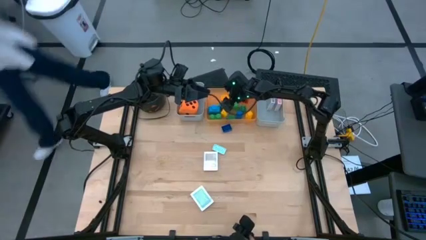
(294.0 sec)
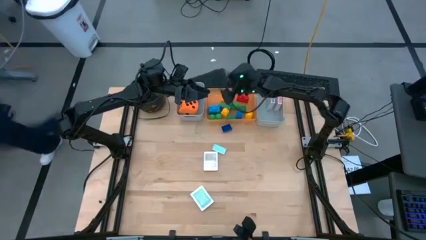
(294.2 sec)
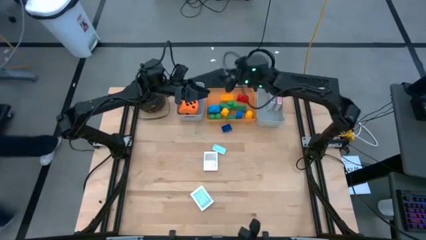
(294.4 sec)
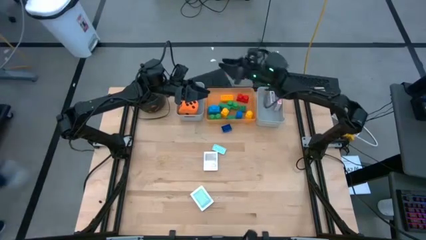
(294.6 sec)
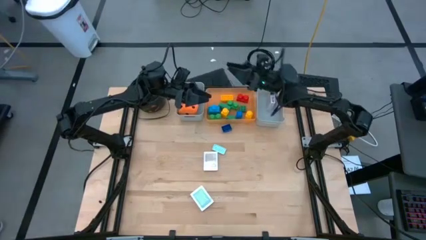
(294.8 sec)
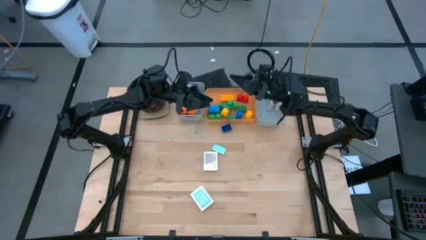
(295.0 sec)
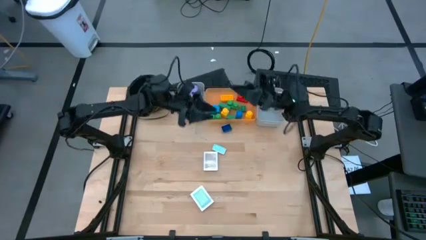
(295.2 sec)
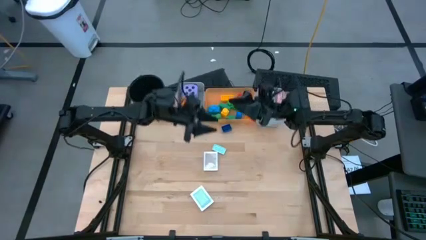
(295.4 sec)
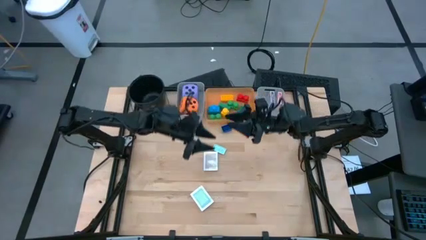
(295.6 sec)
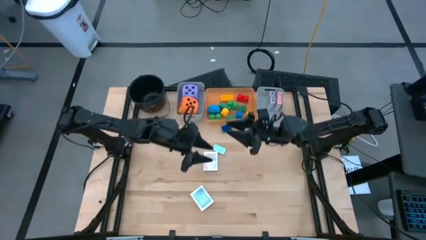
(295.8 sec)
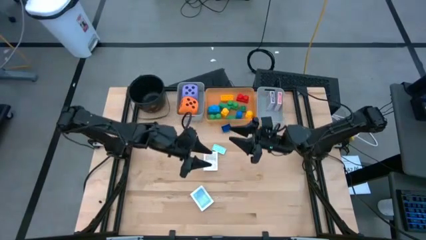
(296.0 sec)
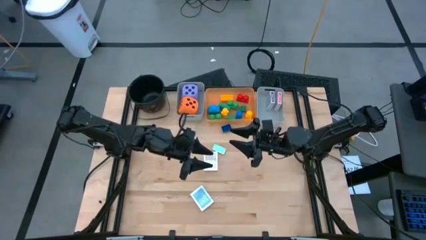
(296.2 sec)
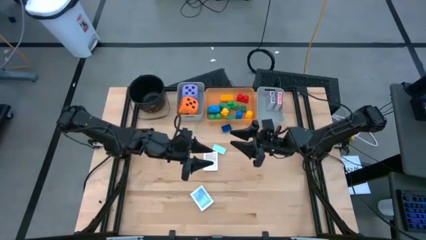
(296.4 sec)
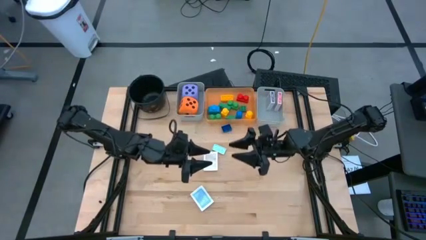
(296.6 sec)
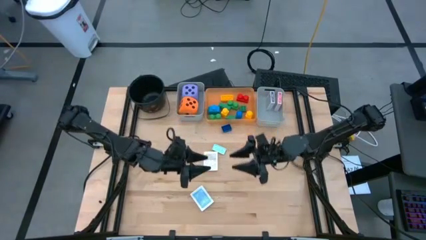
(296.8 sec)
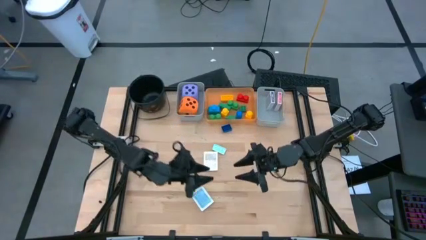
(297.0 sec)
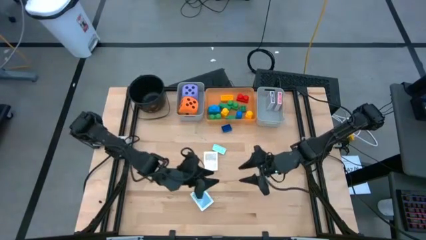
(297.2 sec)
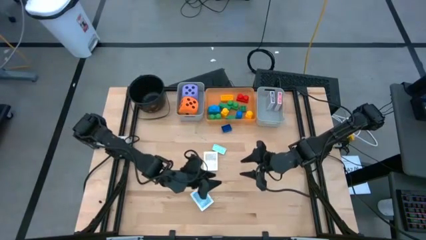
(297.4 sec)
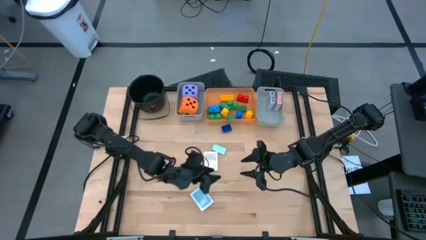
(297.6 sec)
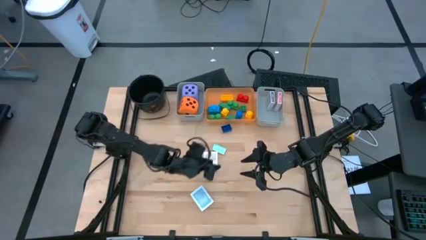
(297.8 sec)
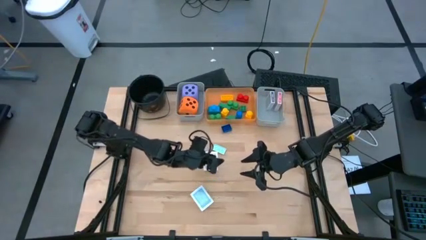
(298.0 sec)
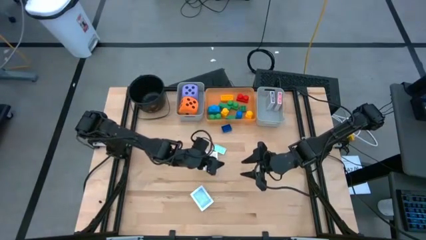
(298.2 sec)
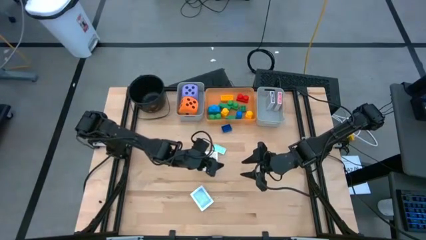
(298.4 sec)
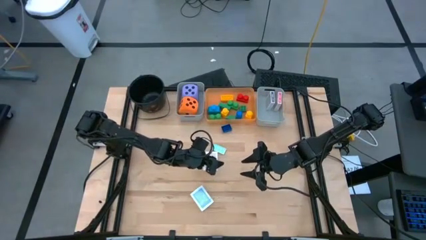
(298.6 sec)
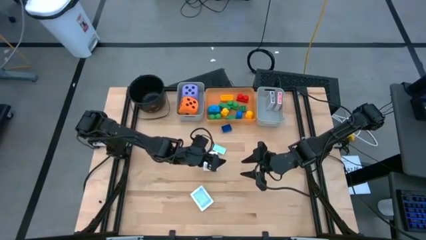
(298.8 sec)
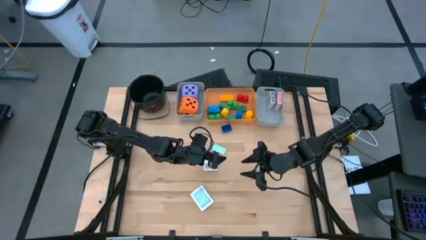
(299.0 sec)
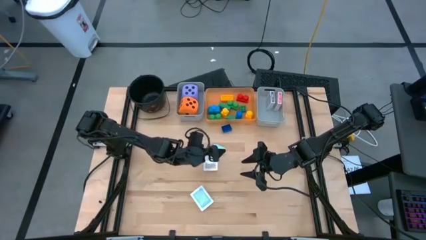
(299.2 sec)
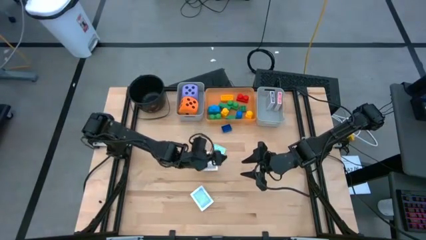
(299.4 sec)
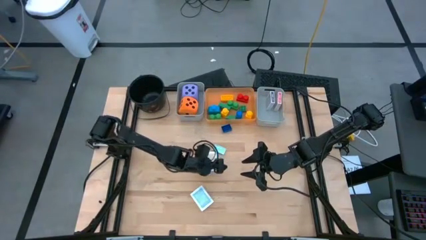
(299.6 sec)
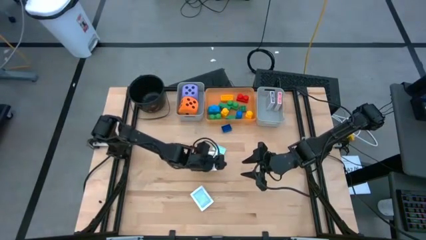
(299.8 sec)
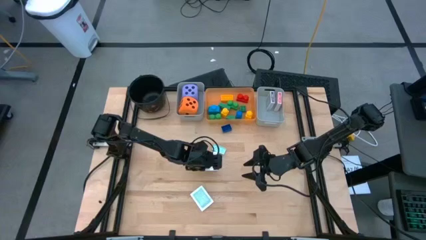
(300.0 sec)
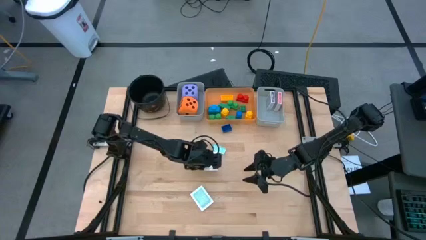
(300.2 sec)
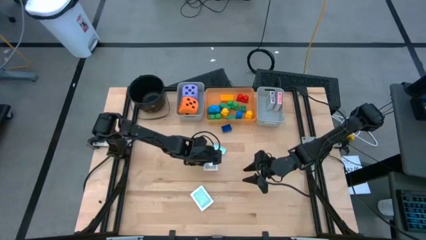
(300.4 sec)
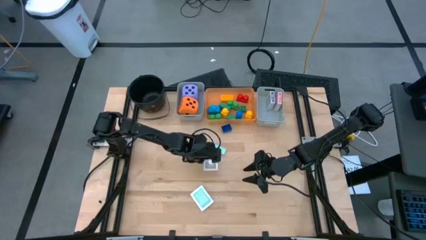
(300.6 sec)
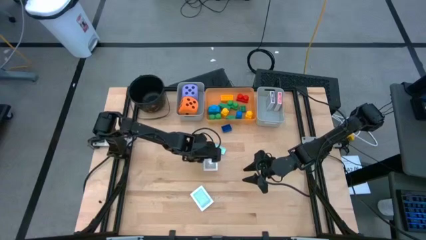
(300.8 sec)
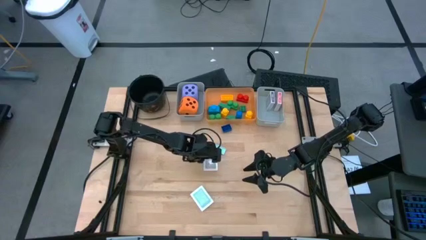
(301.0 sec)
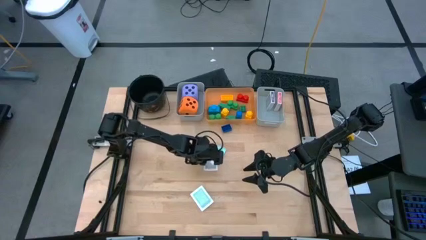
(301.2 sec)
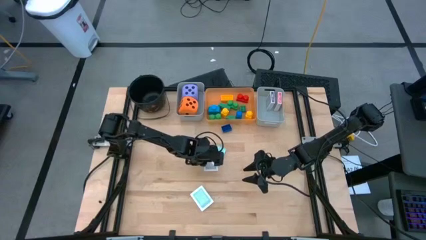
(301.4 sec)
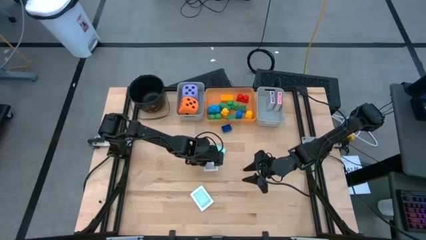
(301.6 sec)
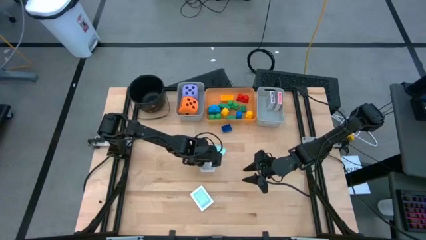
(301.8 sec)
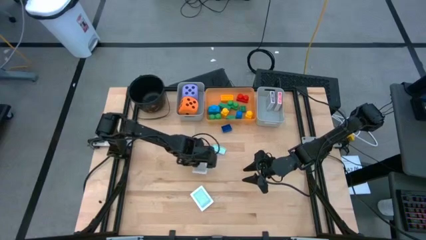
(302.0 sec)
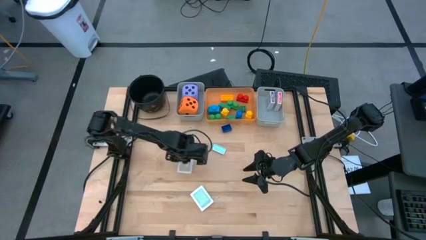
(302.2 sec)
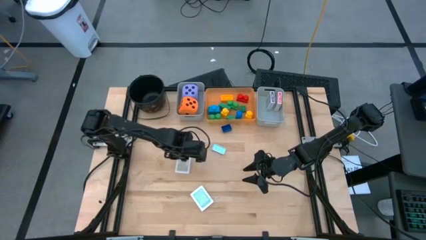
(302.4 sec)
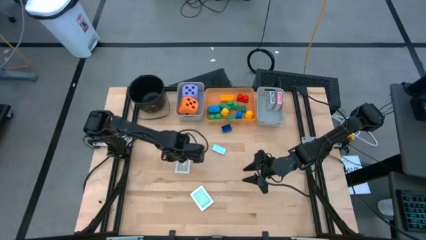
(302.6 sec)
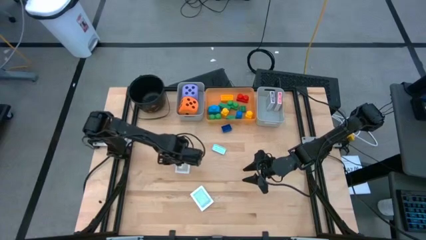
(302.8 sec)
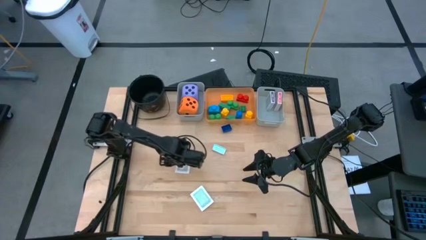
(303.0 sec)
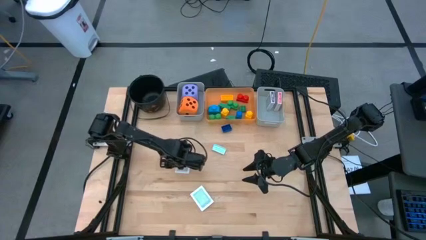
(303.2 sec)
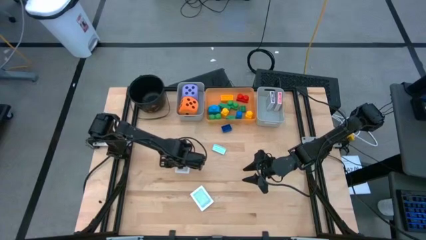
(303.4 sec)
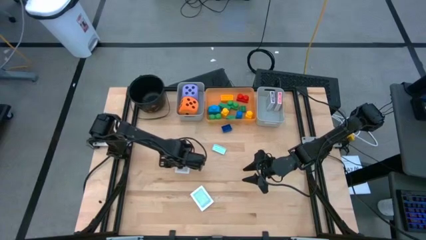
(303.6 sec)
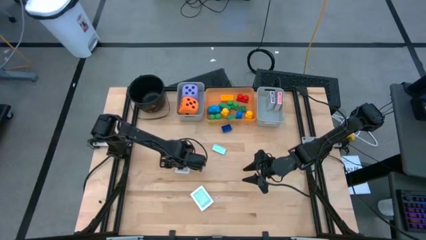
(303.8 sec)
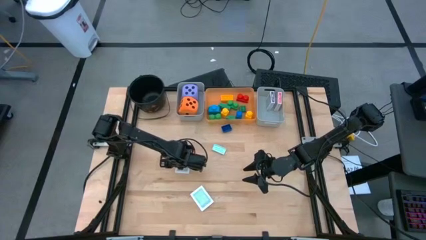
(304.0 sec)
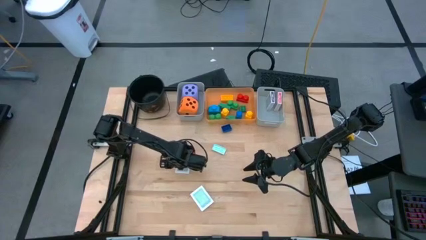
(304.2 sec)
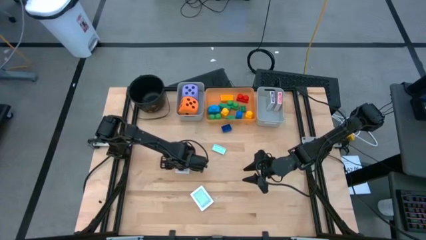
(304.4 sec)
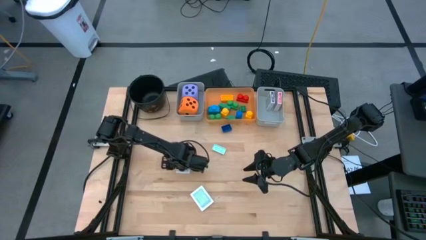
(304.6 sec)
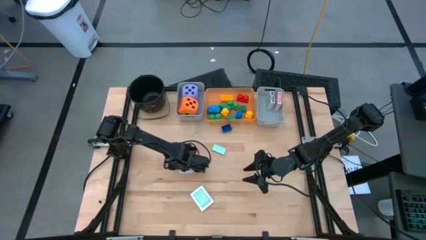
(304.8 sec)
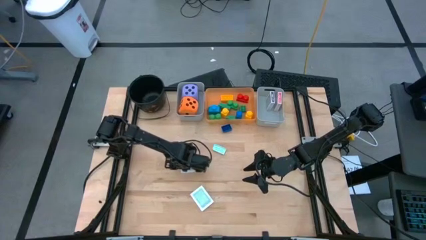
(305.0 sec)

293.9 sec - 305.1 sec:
Task: Pick & Place Toys
Put the brown deck of cards into the right gray bin
